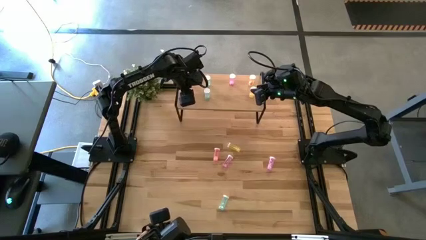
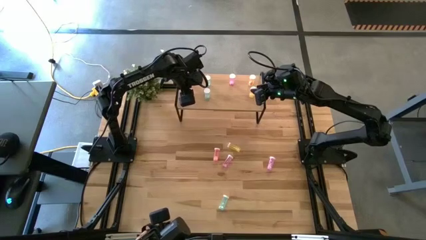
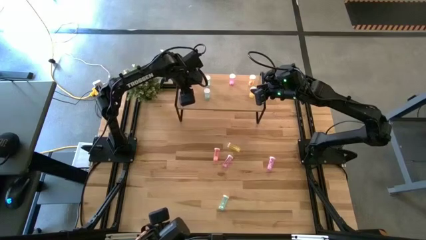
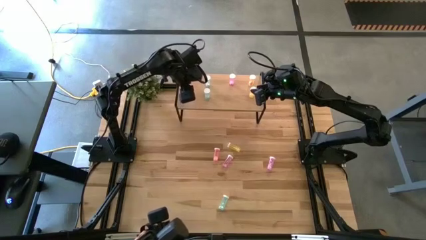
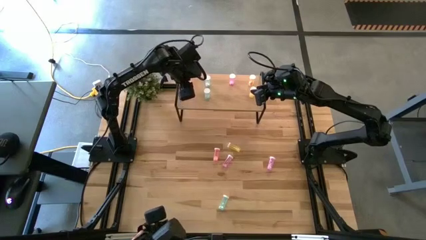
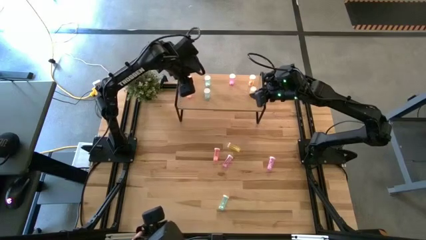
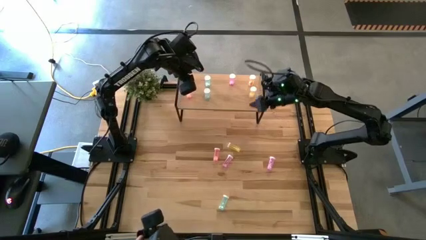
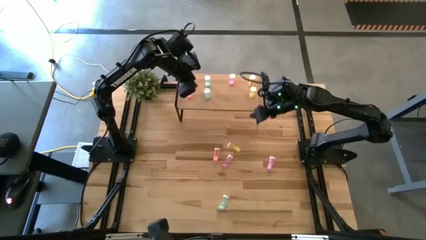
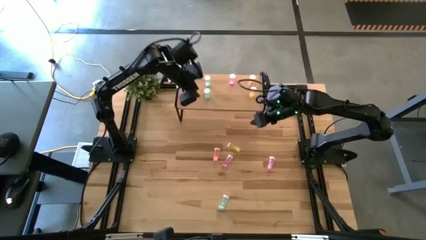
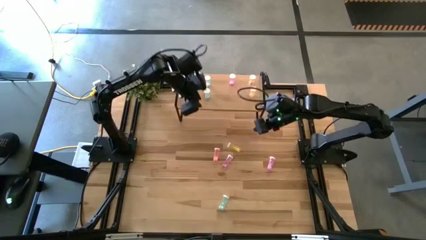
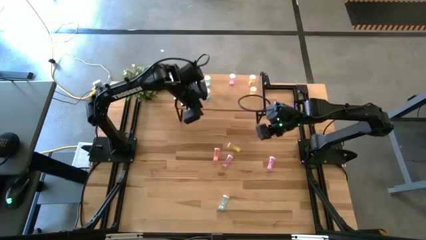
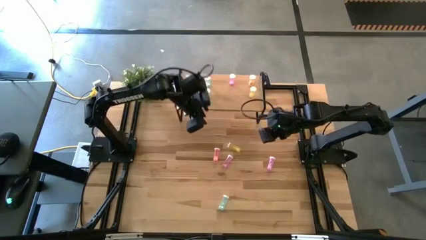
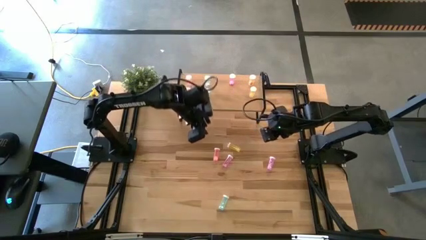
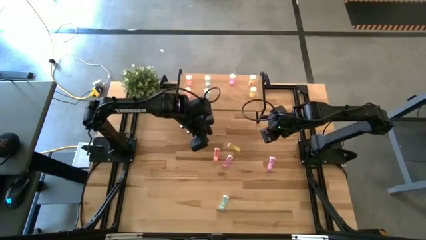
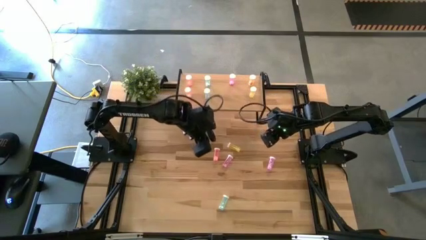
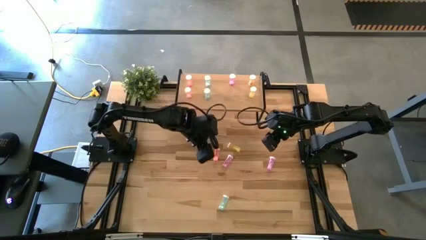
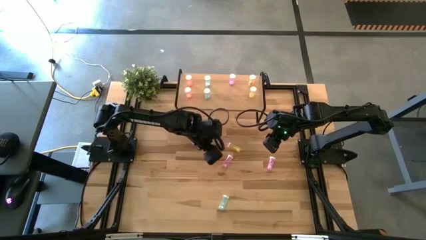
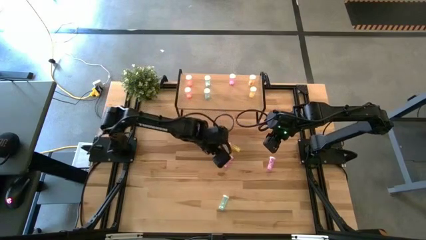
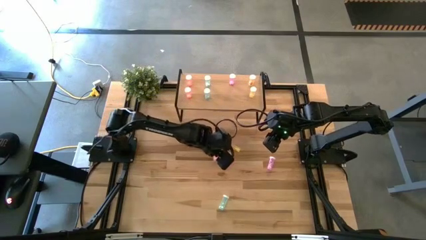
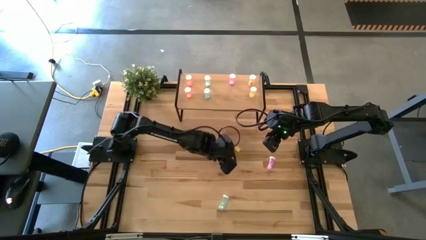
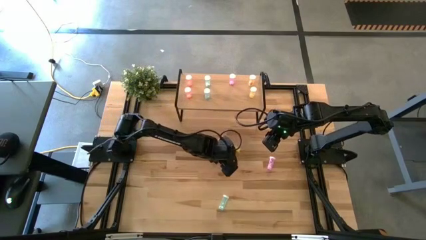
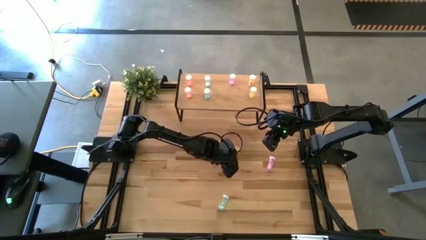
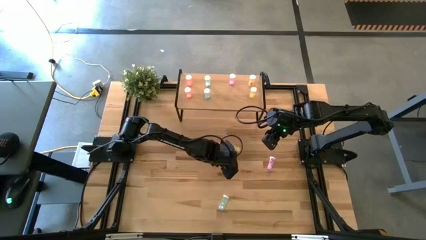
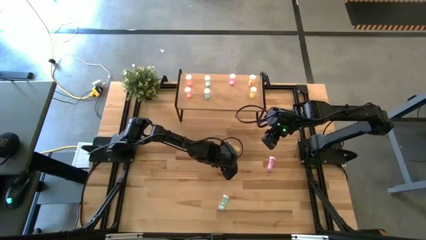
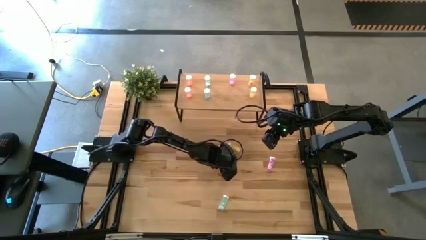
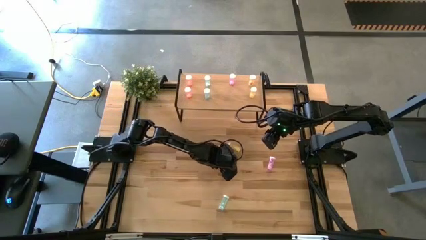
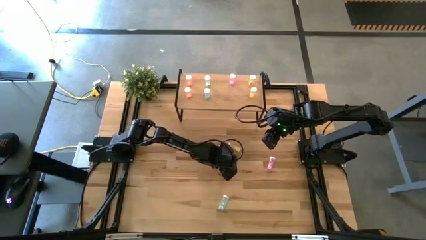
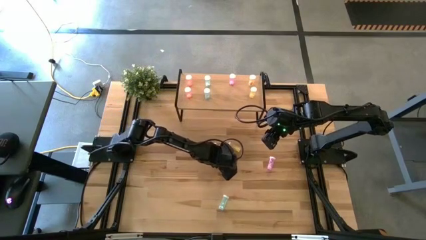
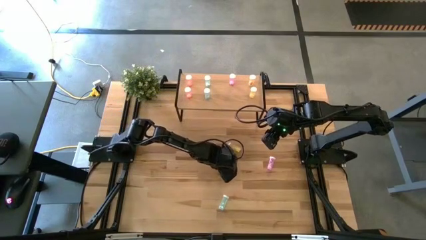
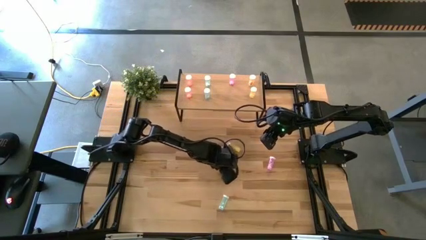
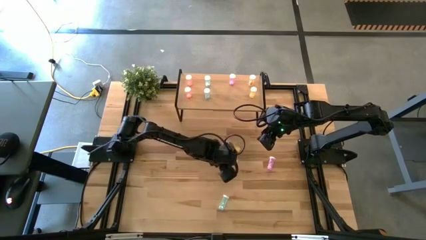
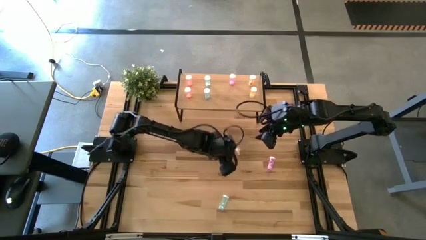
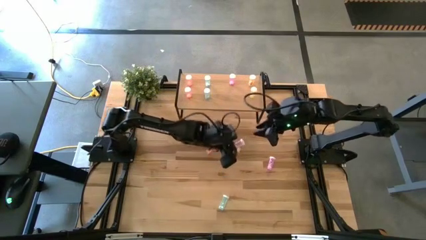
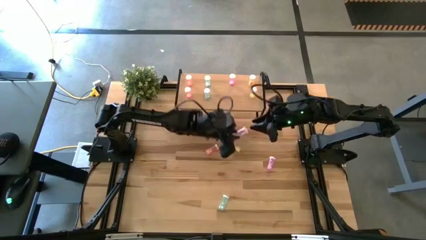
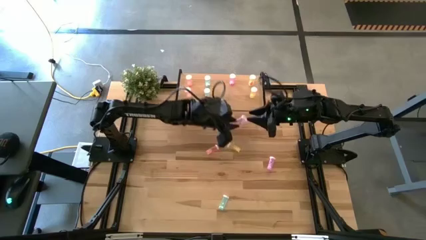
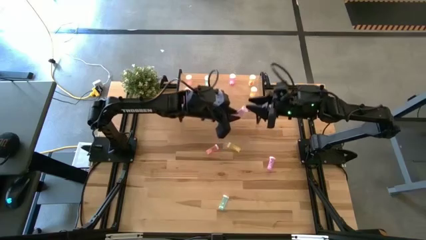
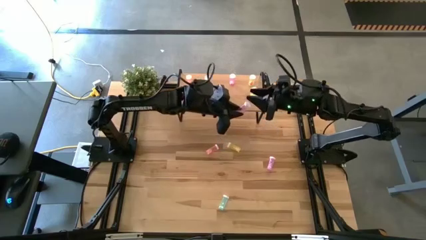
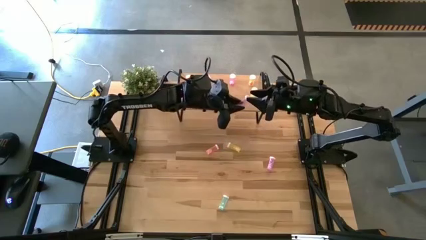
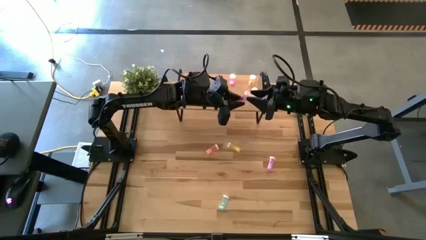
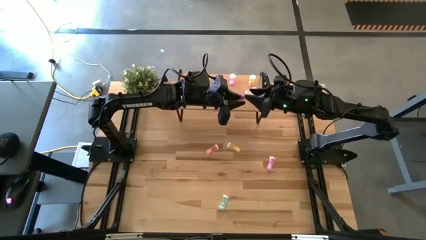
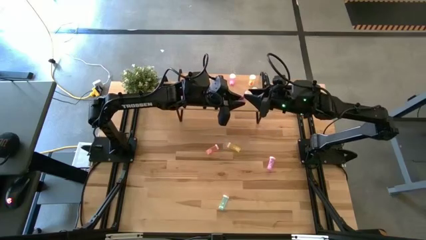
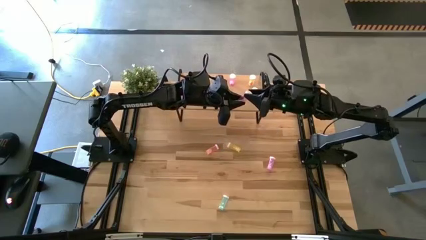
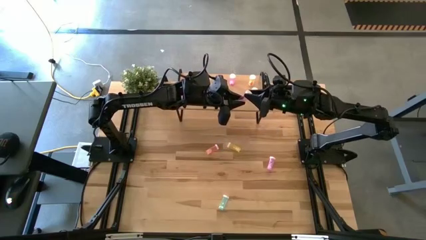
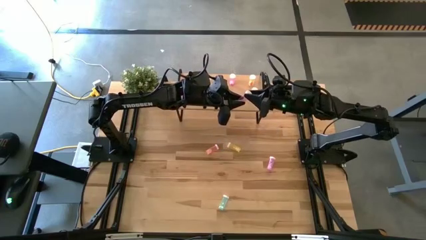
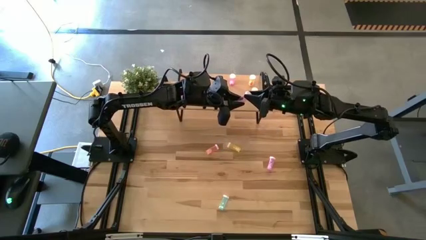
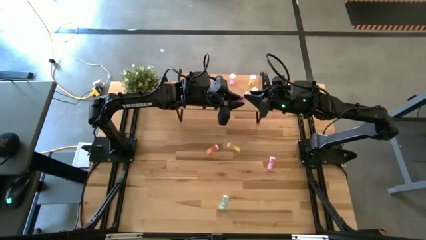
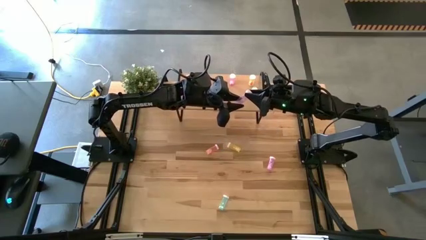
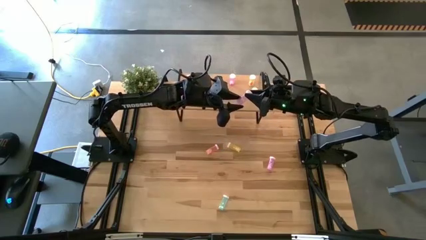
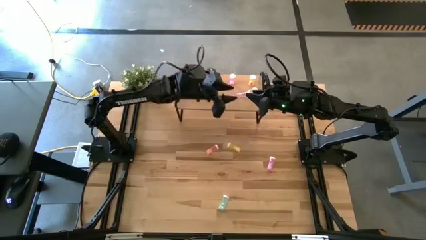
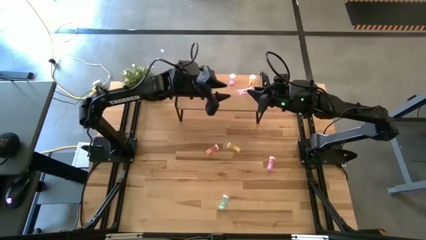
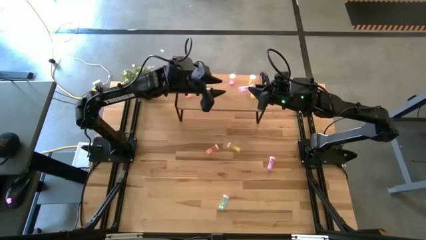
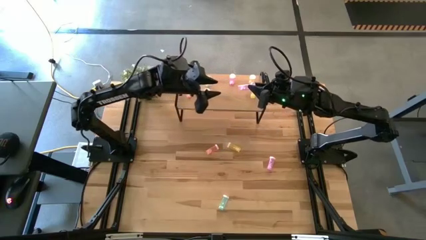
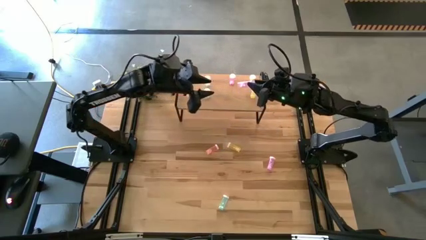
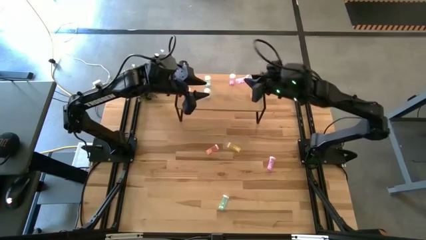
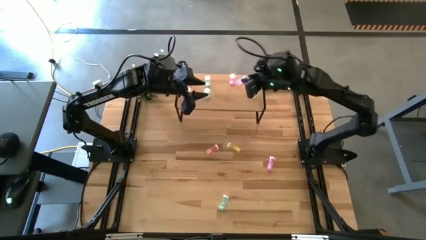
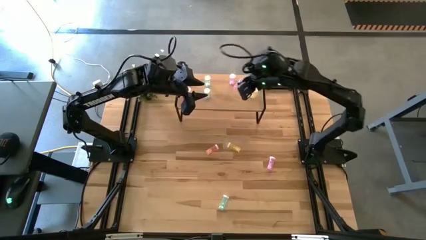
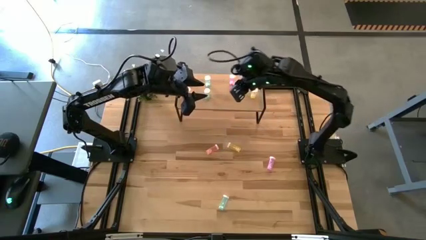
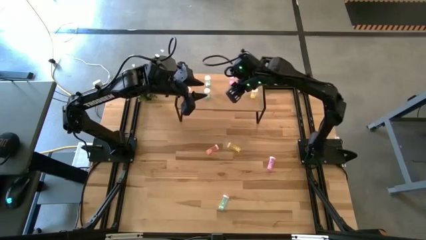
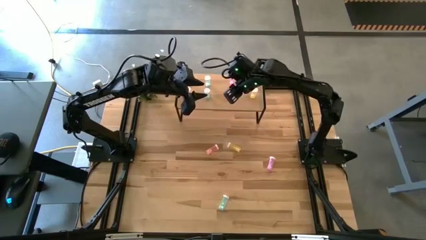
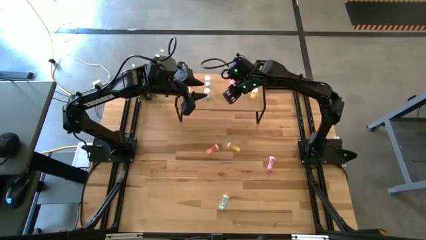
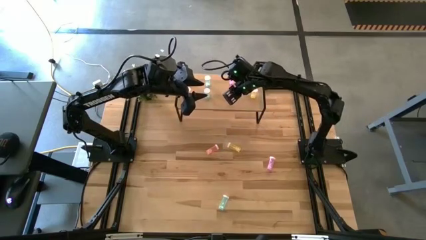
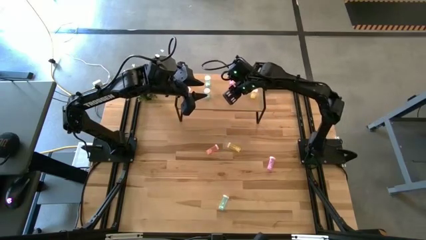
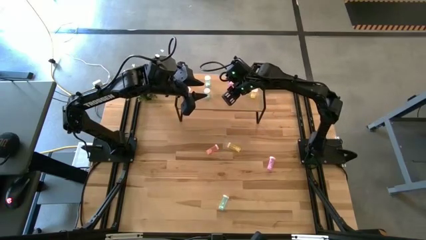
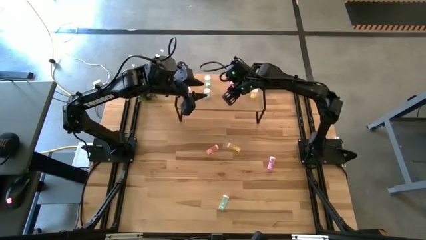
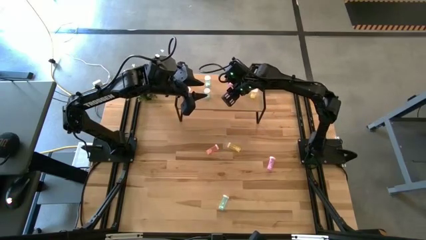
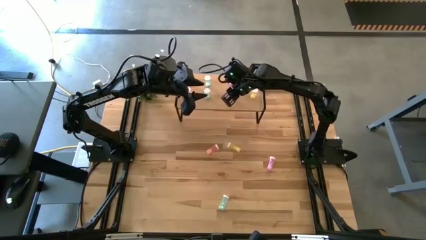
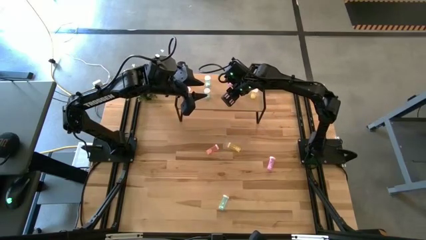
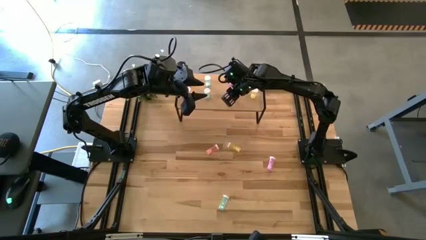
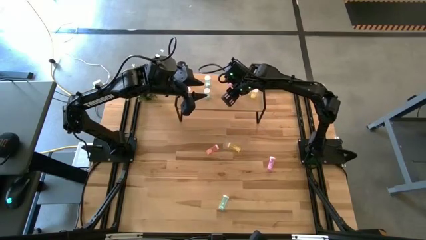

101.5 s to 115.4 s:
Task: Pick and place medicine bottles onto shelf by color
Put the top left purple pill bottle on the shelf aligned with the other purple pill bottle

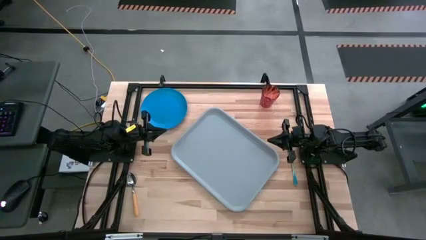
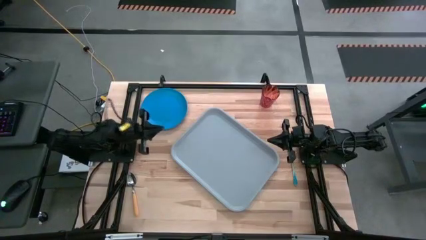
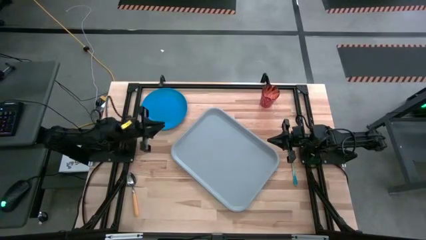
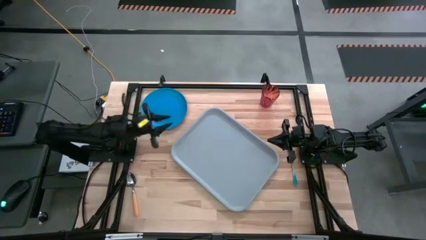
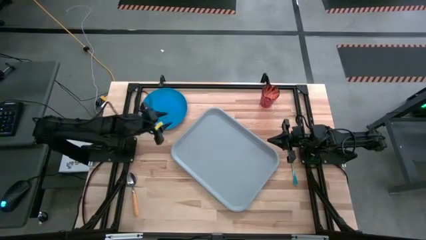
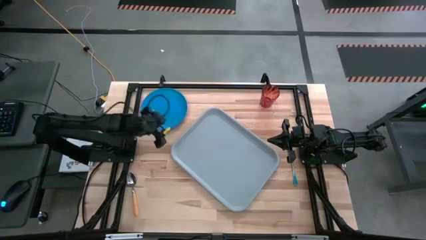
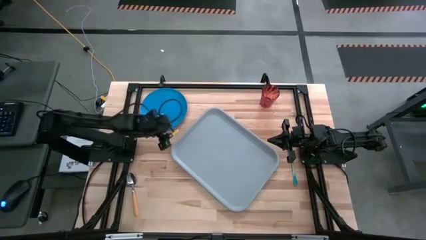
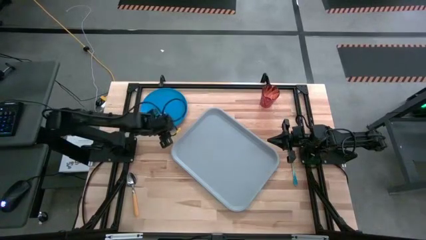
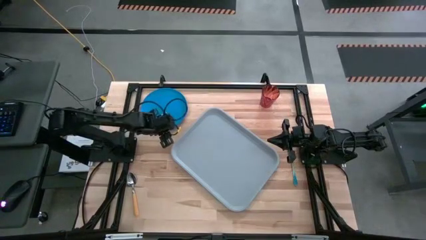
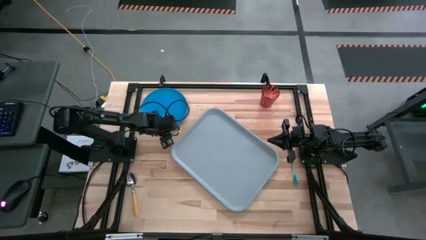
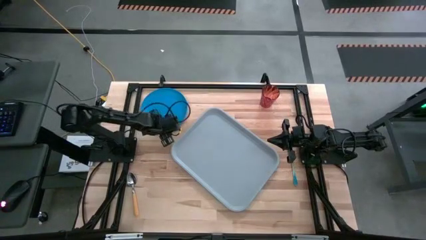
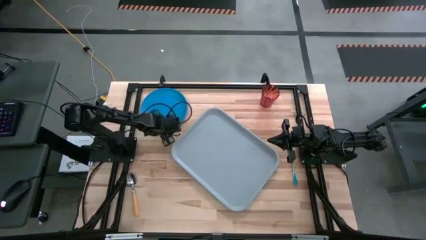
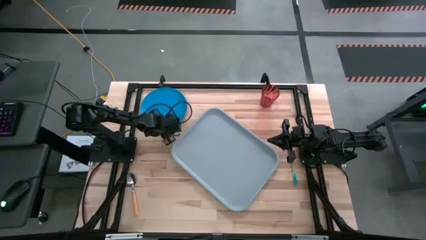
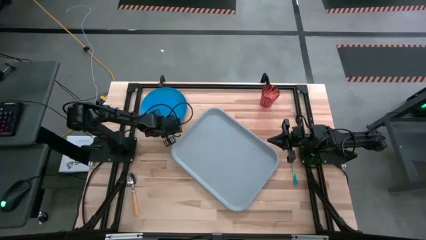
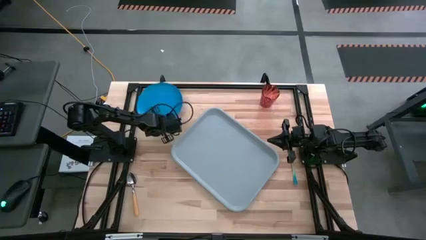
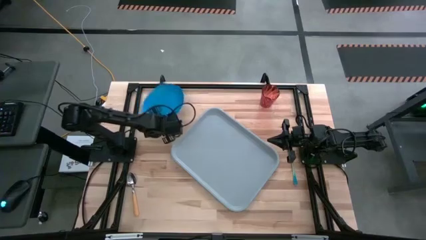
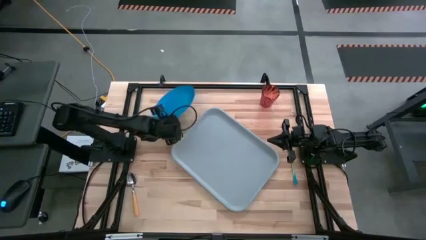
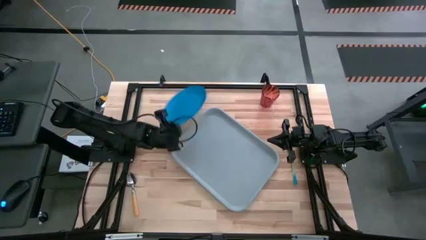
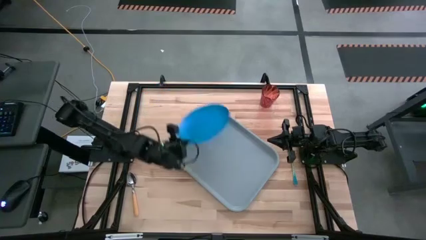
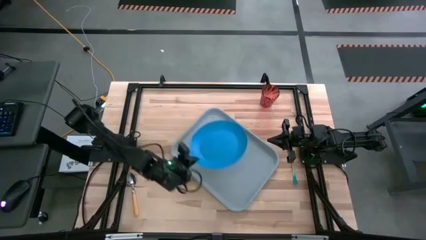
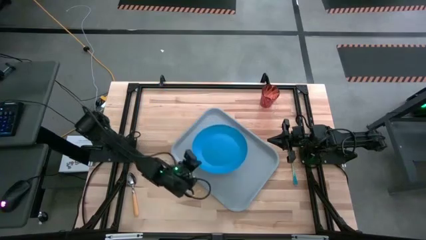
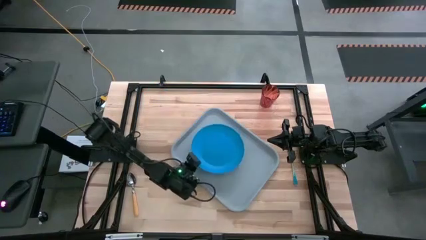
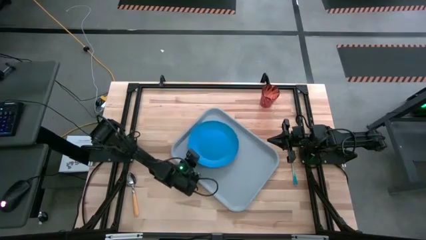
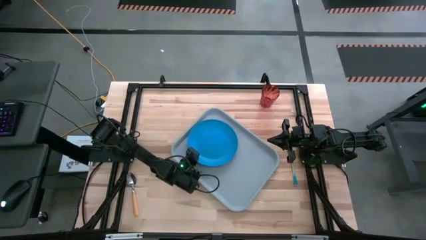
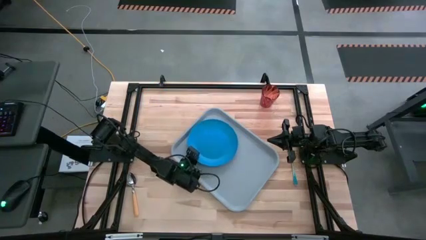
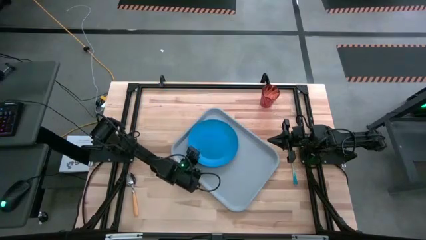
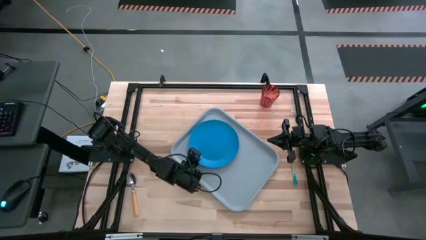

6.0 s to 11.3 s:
Task: Pick and place plate/cup/fork/spoon on tray
Put the blue plate on the center left of the gray serving tray
